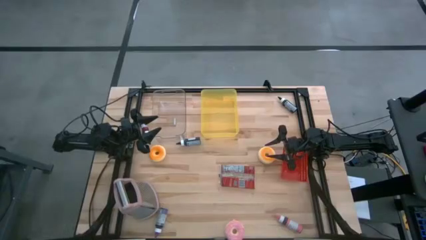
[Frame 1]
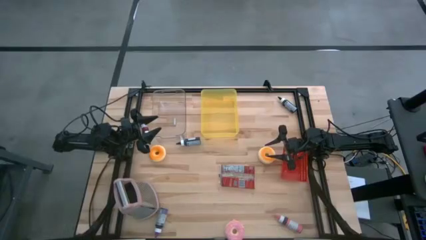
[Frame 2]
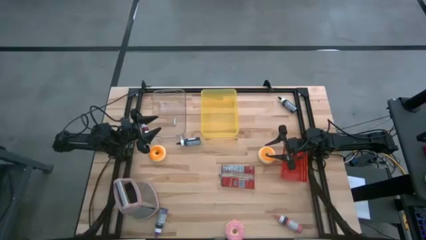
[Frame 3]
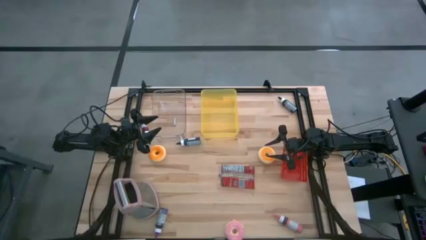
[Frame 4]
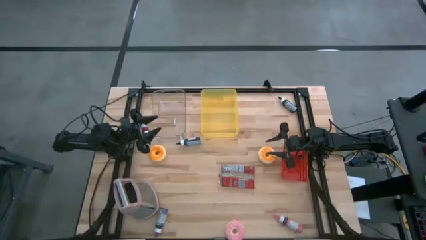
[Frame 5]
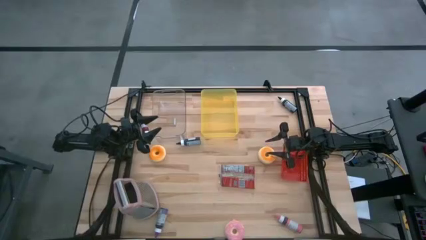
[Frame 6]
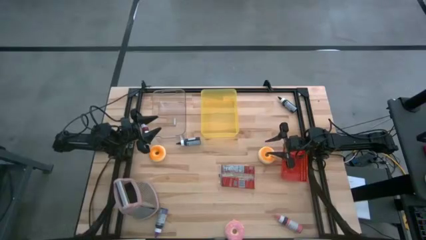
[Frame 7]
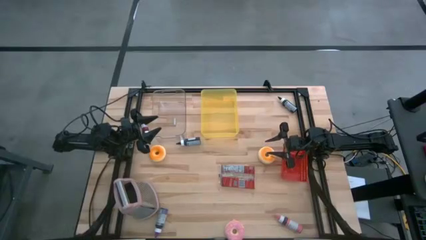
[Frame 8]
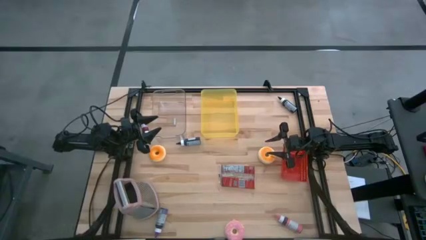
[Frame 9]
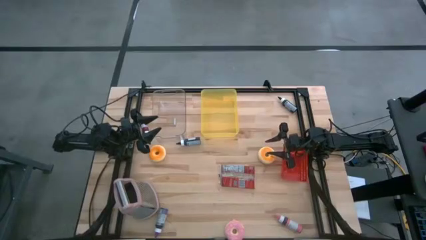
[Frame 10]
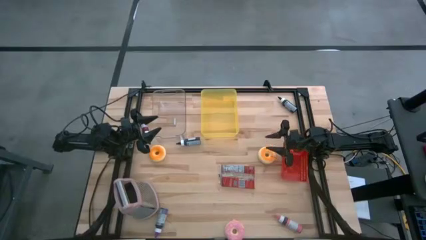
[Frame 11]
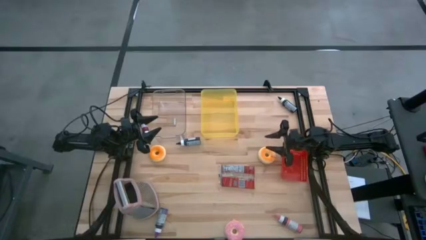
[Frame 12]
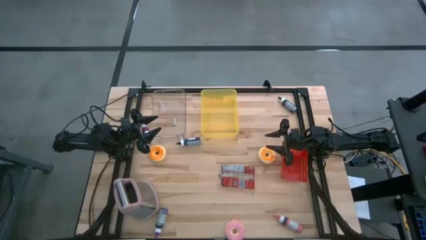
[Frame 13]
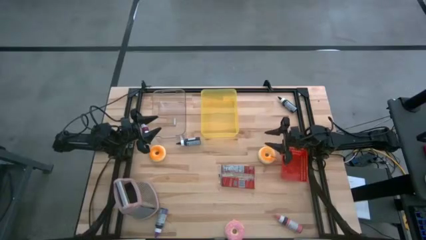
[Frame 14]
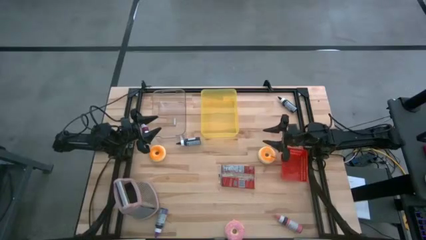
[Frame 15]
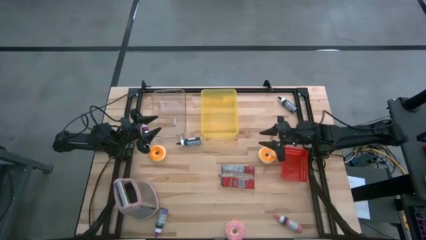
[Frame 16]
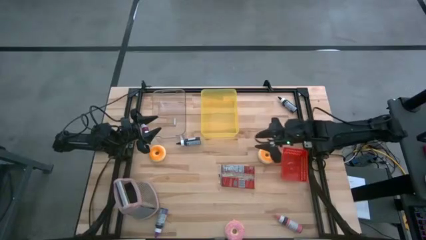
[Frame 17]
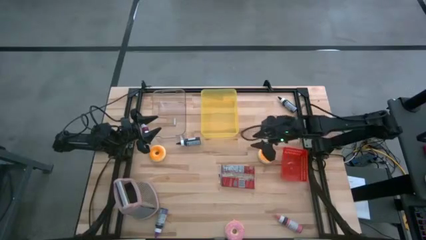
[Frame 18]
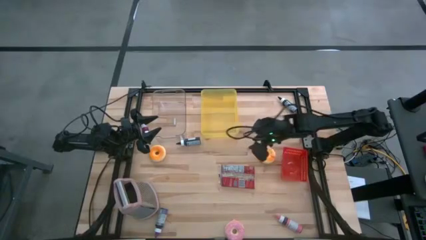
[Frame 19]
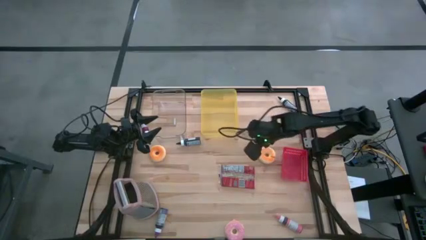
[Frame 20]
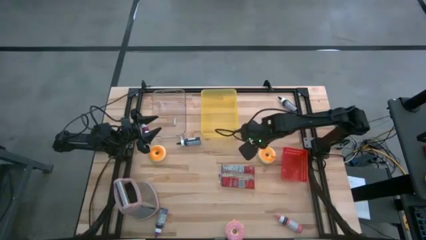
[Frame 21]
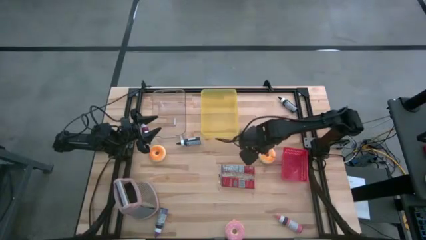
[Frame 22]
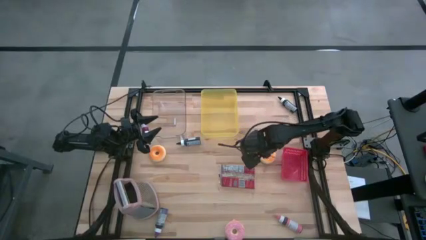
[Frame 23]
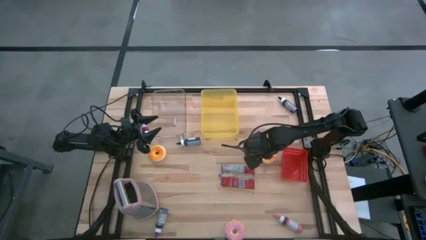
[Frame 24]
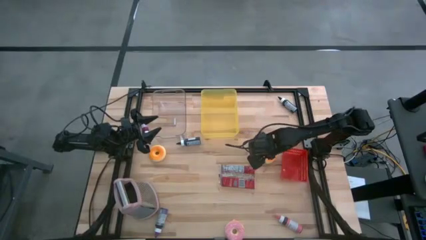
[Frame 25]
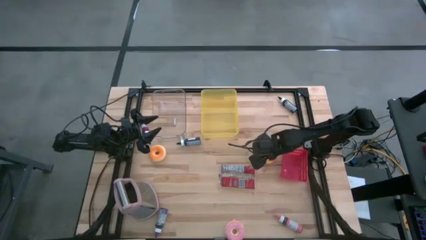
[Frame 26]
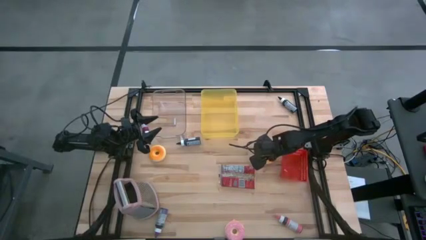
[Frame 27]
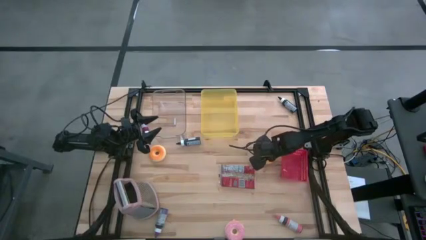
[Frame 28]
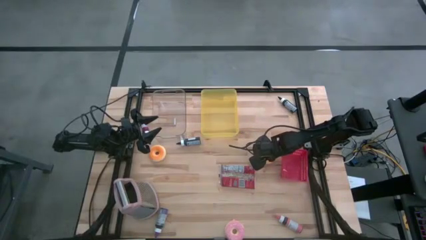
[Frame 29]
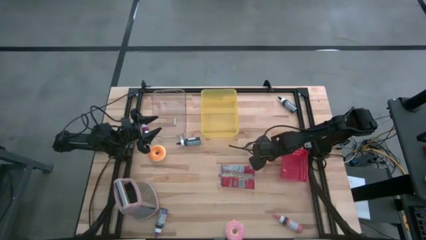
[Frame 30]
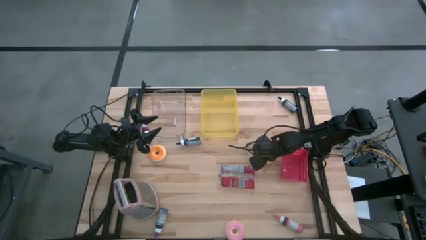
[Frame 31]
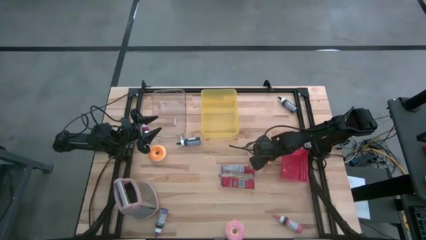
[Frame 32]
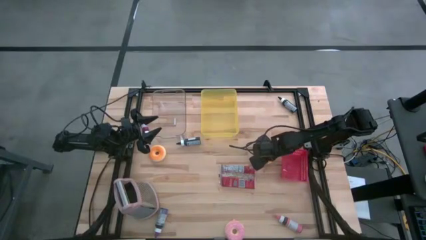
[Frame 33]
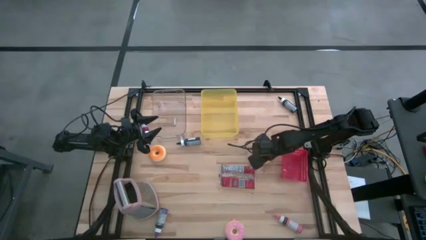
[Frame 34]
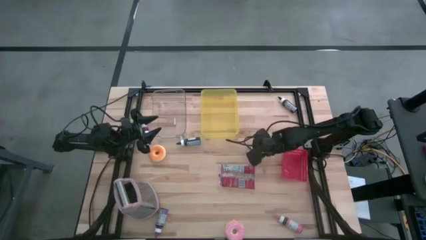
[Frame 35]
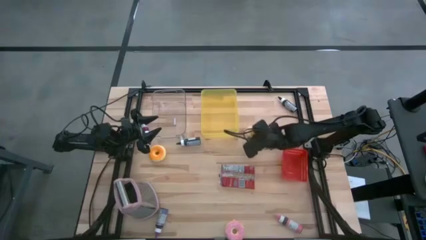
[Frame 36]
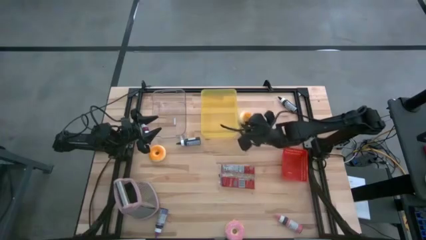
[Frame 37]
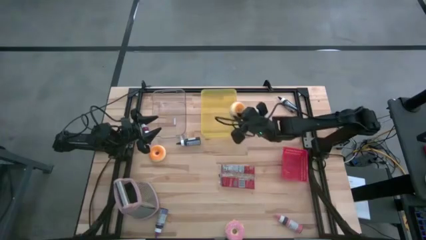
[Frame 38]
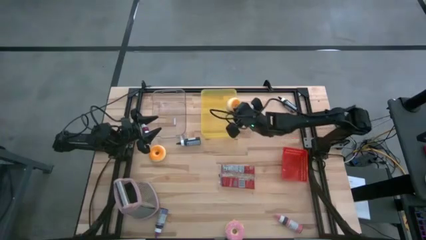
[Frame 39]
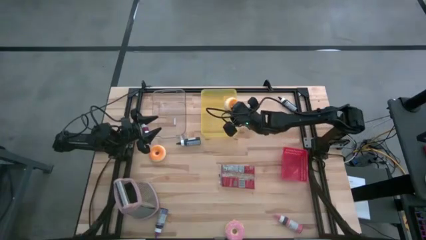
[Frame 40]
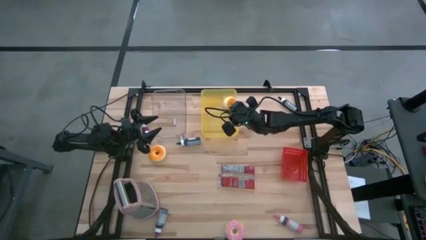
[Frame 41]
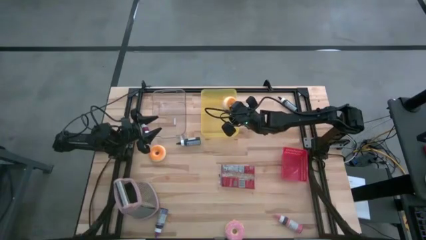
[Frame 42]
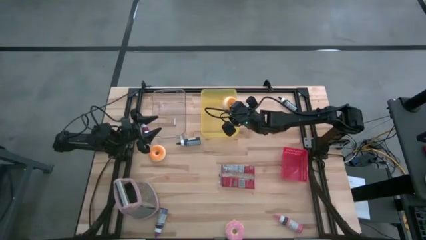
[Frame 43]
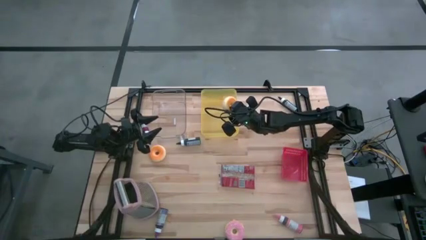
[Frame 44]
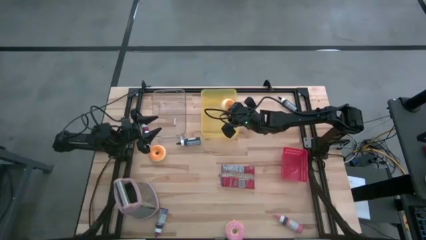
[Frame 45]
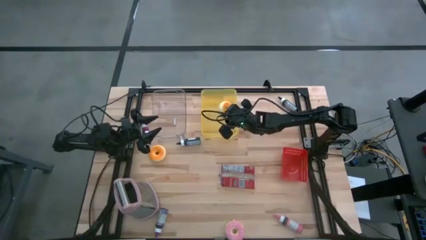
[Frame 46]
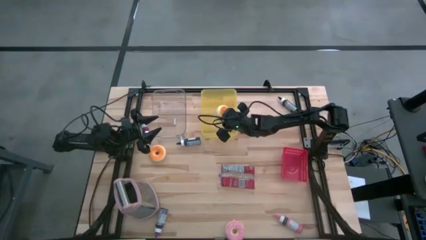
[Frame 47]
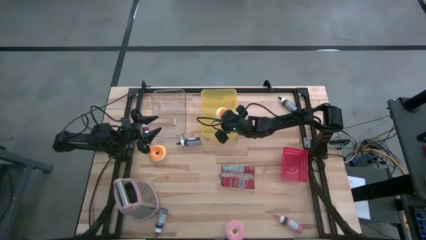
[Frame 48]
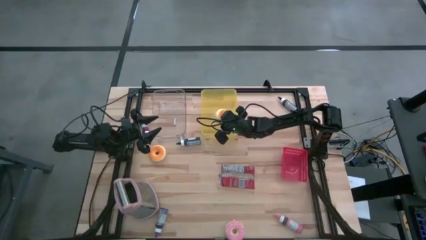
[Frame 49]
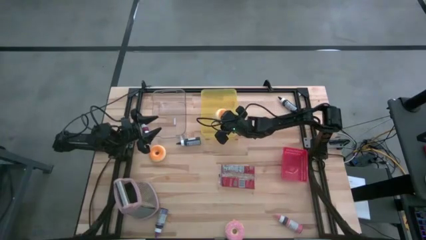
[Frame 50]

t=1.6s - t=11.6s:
Task: Pick & Place Food Item
Put the right orange donut into the yellow bin
